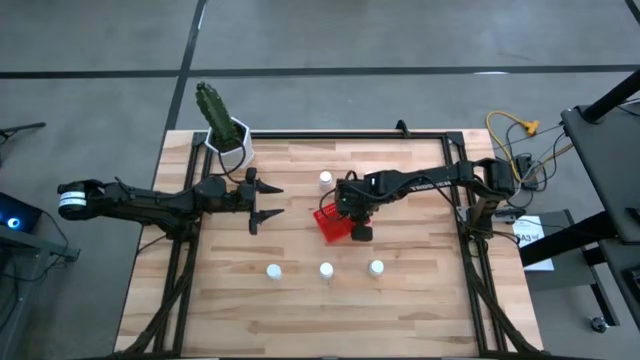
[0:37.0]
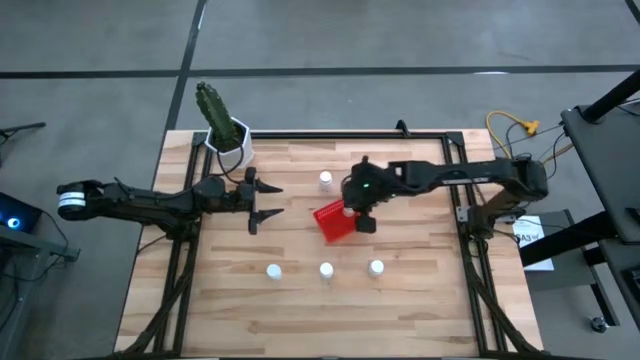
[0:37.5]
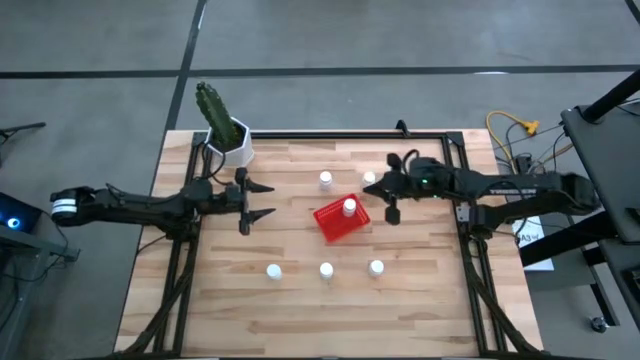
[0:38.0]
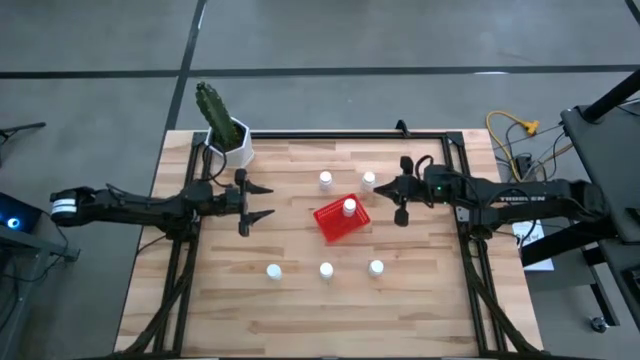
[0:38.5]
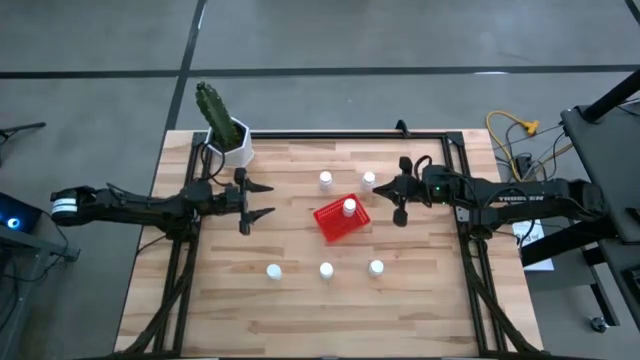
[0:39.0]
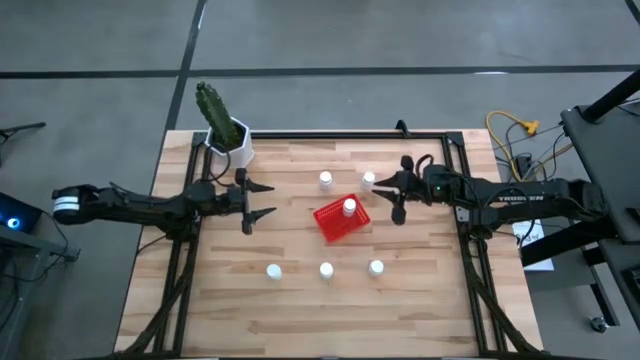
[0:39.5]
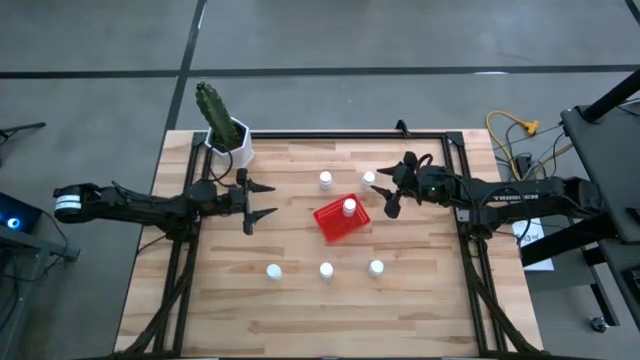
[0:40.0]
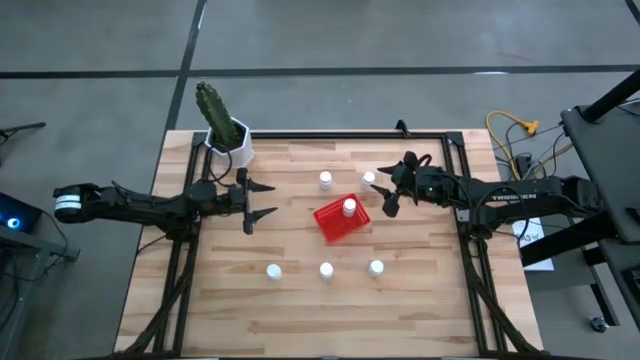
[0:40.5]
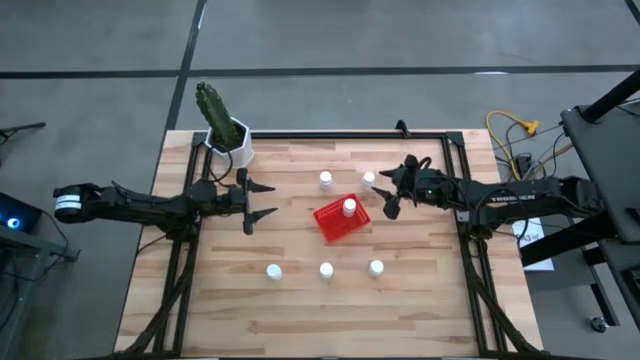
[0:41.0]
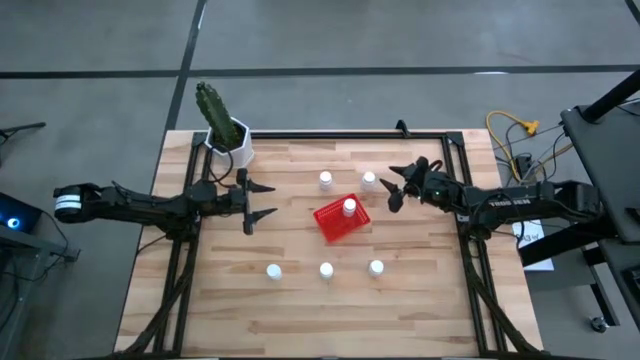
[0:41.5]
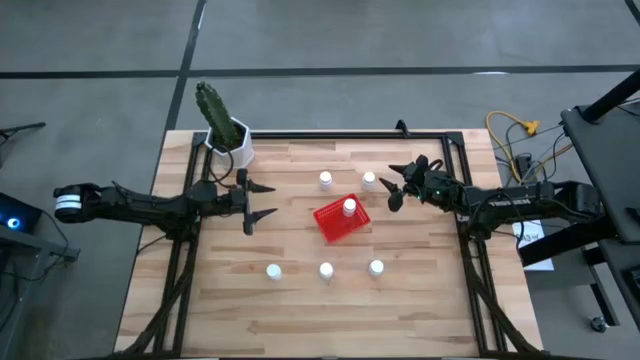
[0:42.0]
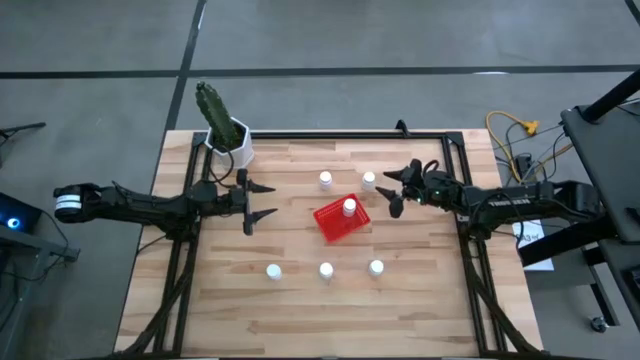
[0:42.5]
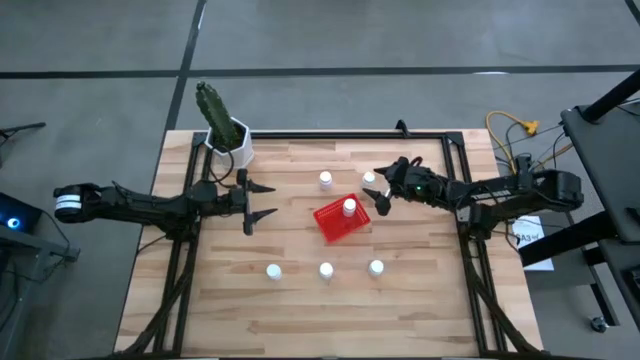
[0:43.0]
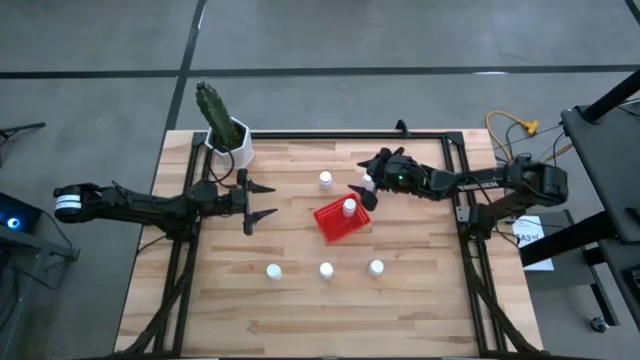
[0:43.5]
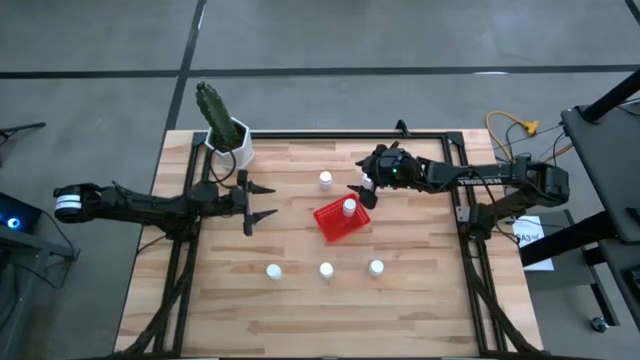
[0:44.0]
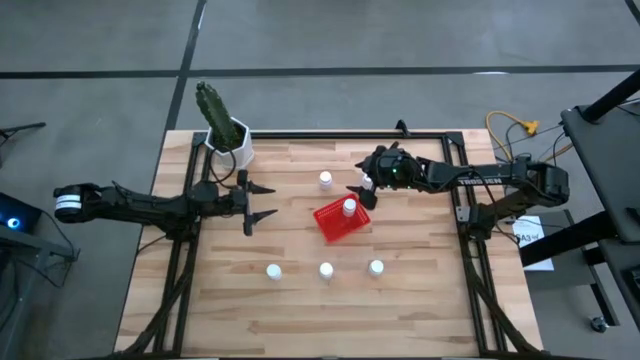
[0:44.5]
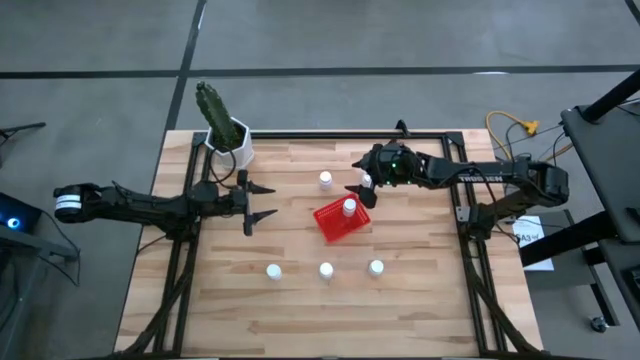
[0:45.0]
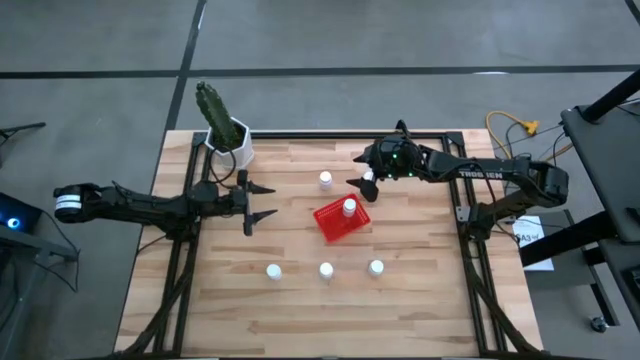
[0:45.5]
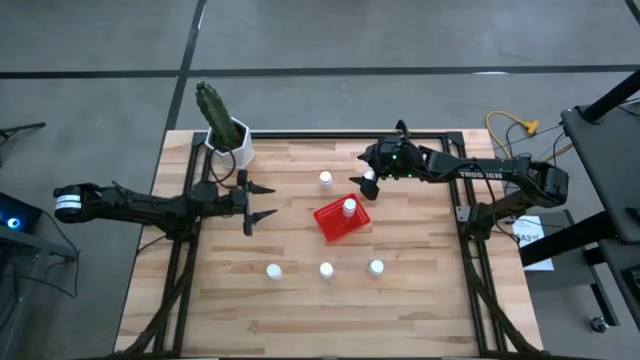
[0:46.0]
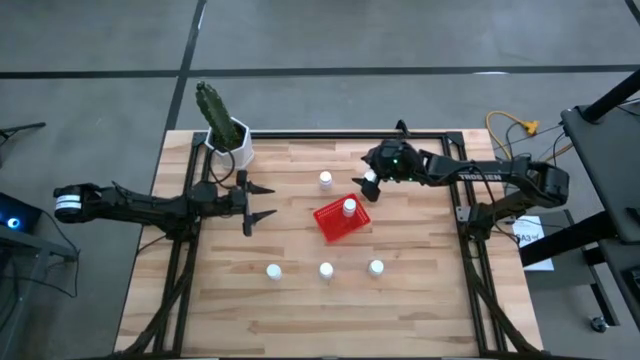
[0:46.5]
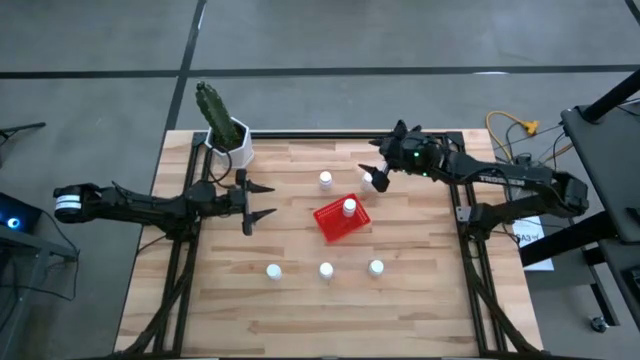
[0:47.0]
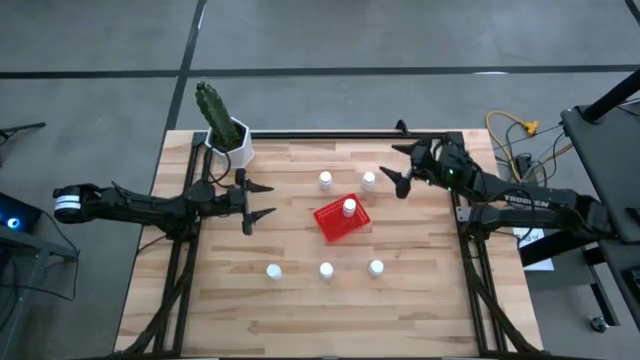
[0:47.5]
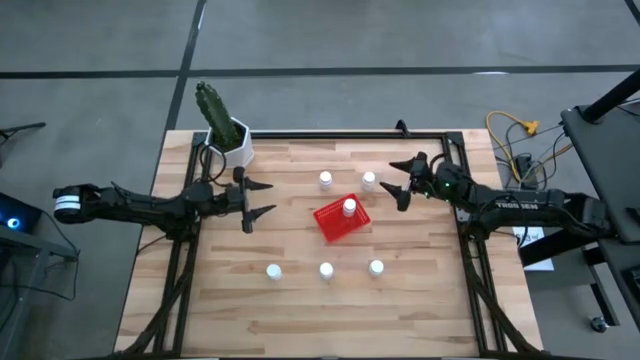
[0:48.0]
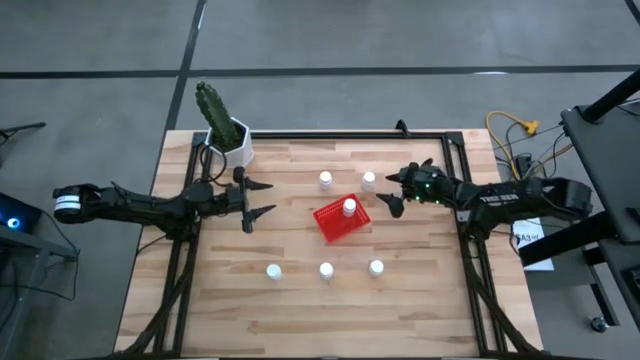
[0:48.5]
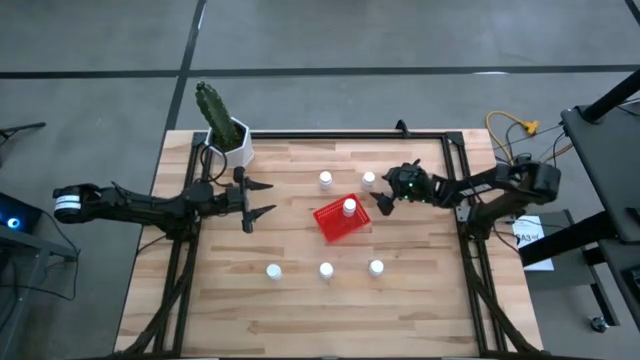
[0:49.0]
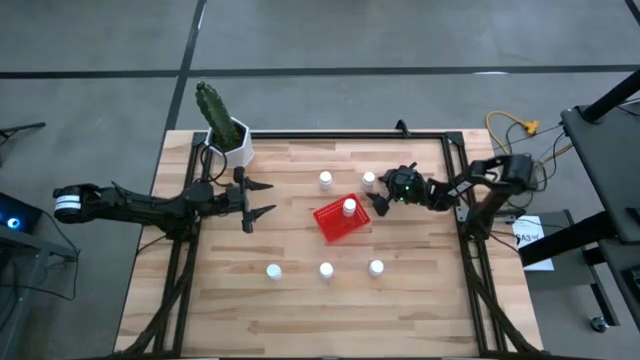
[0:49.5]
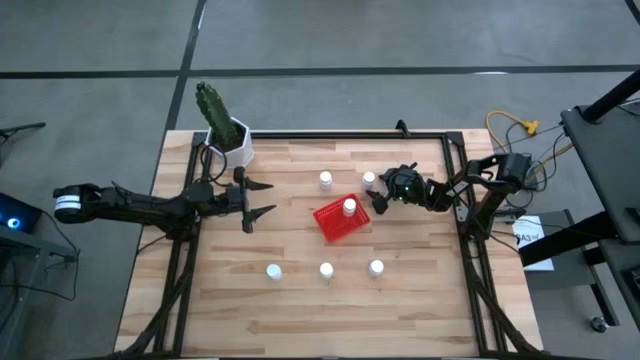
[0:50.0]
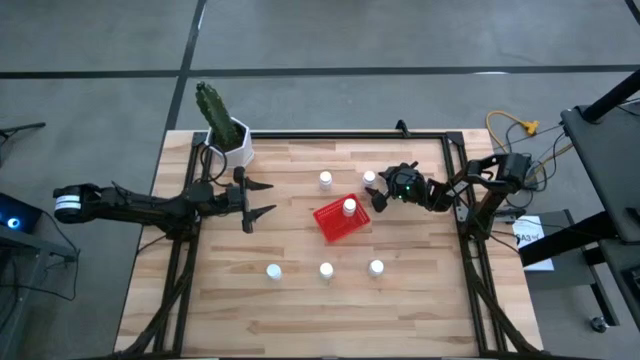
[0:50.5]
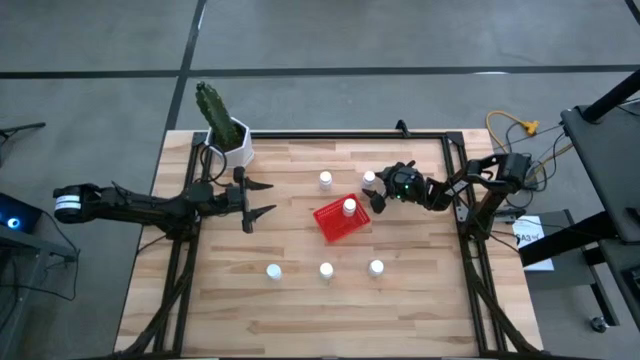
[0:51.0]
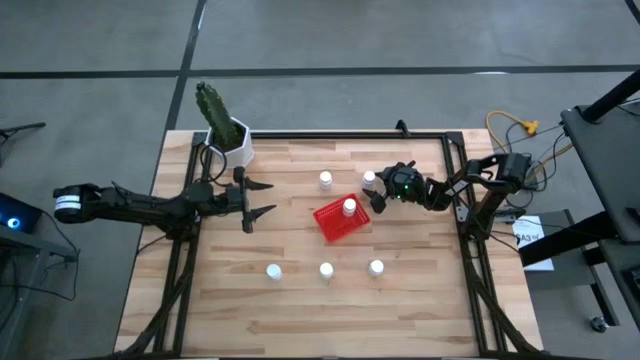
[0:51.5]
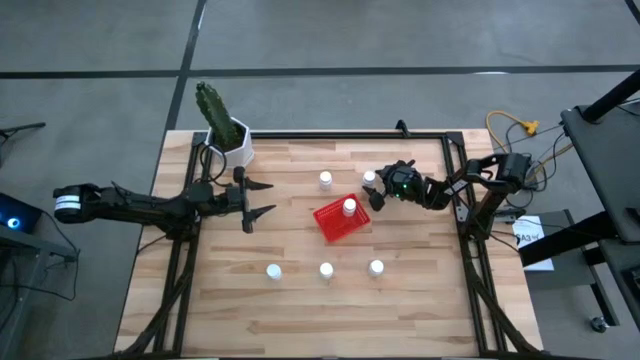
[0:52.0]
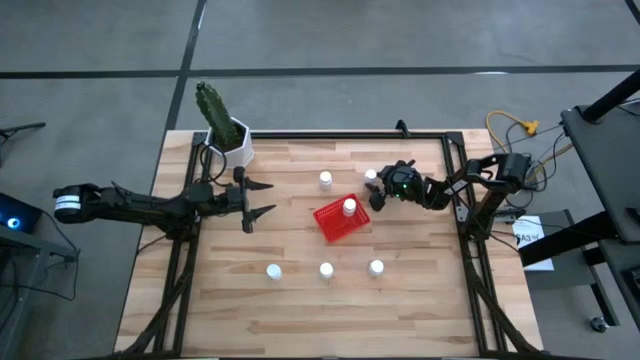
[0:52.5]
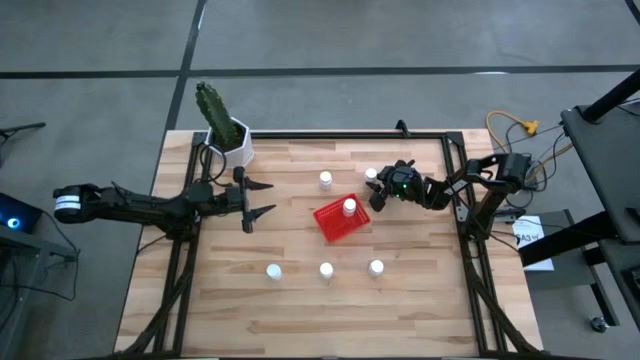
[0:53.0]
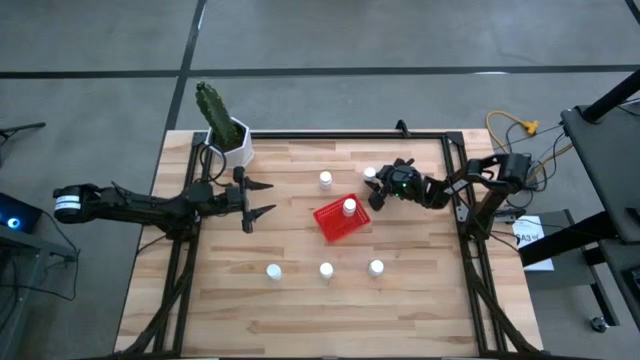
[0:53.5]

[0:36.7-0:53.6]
Task: Pick and place pill bottles into a basket
Put the white pill bottle into the red bin
